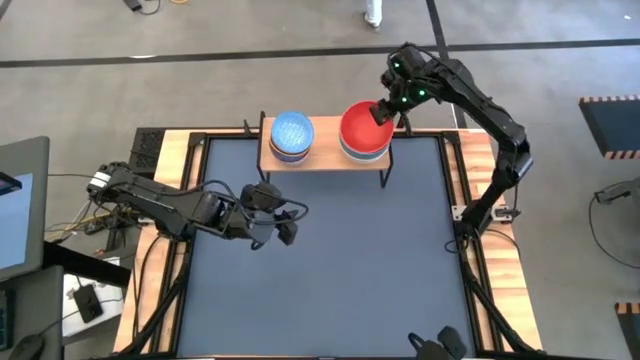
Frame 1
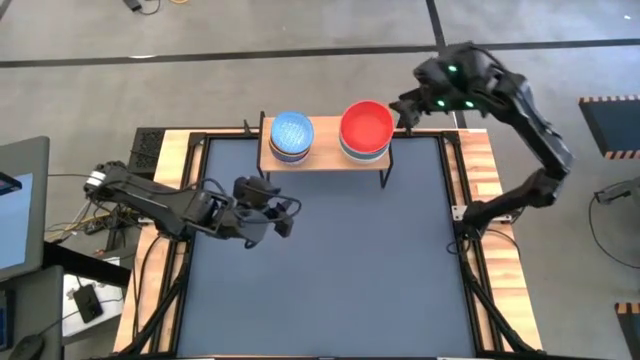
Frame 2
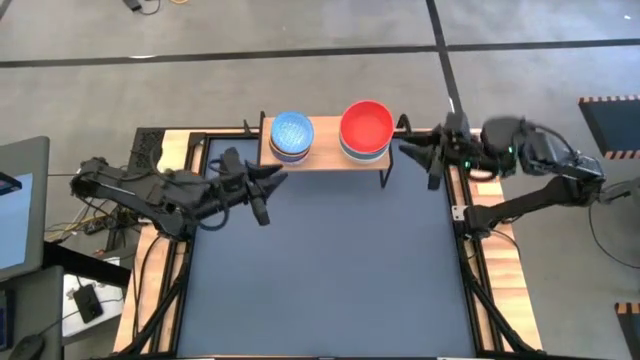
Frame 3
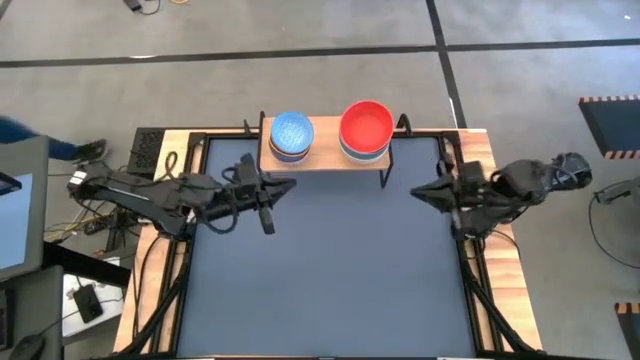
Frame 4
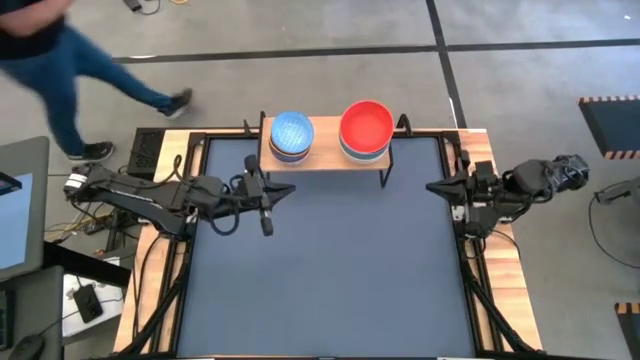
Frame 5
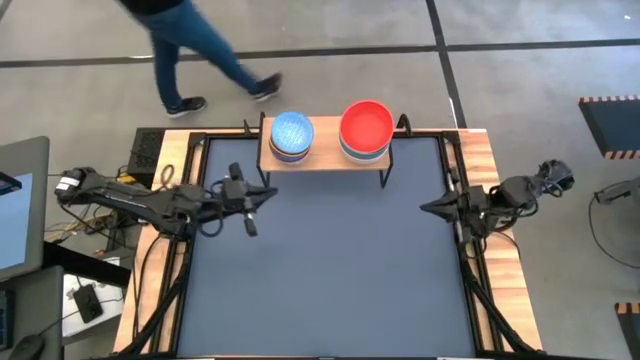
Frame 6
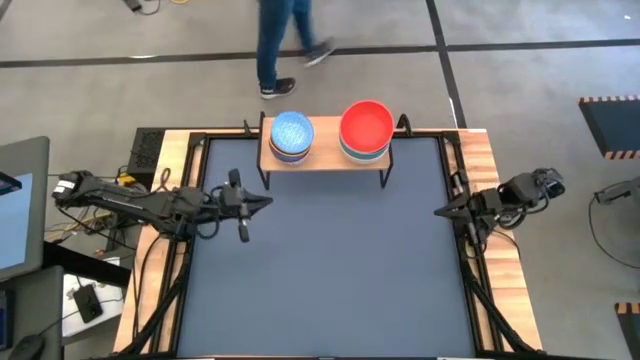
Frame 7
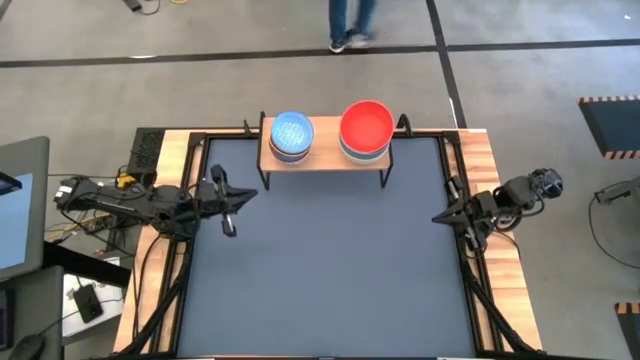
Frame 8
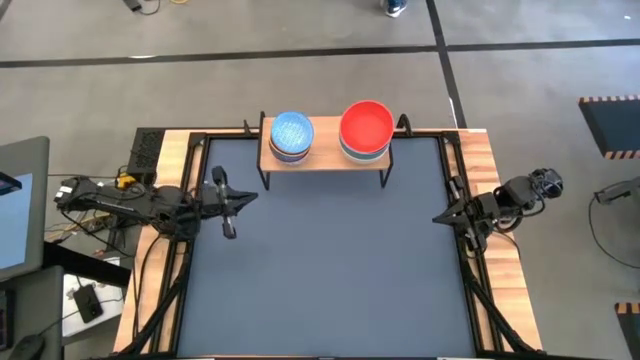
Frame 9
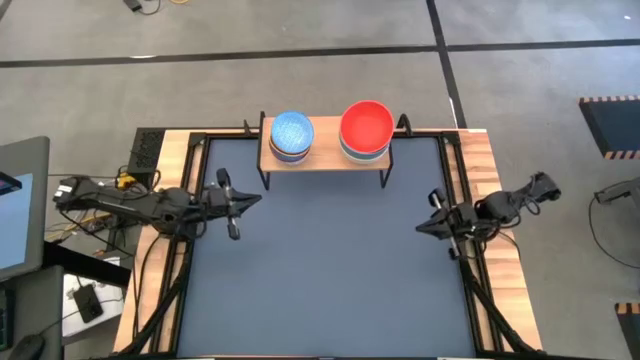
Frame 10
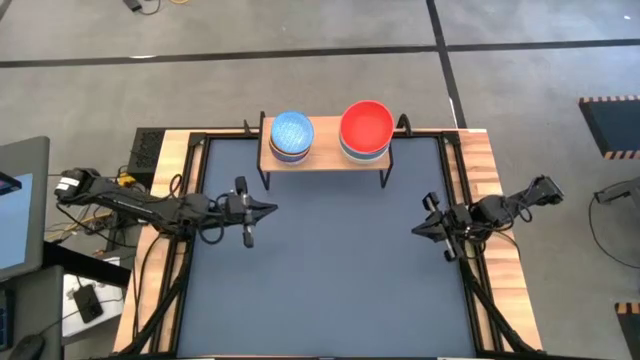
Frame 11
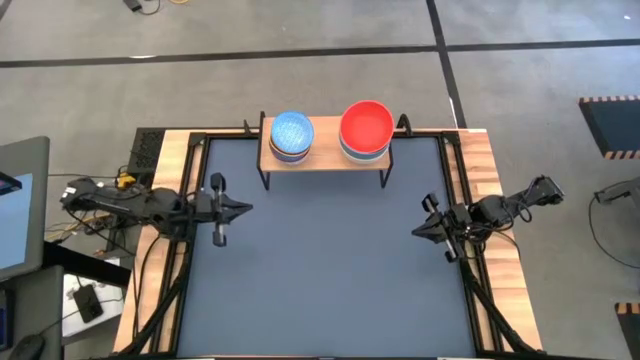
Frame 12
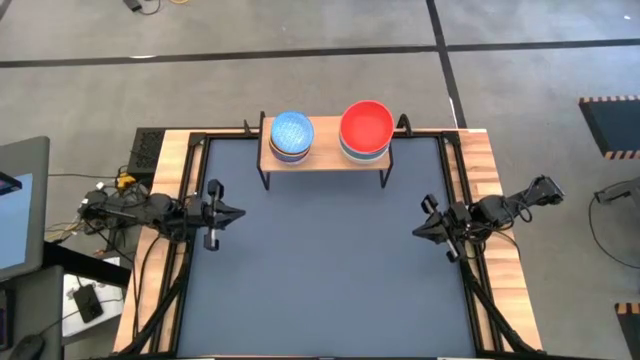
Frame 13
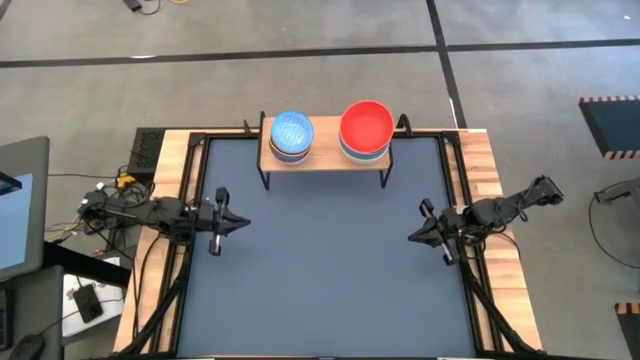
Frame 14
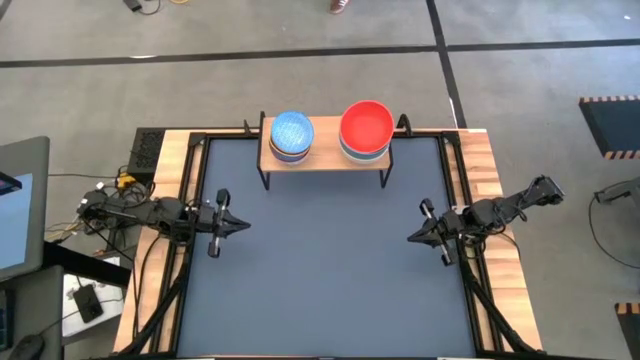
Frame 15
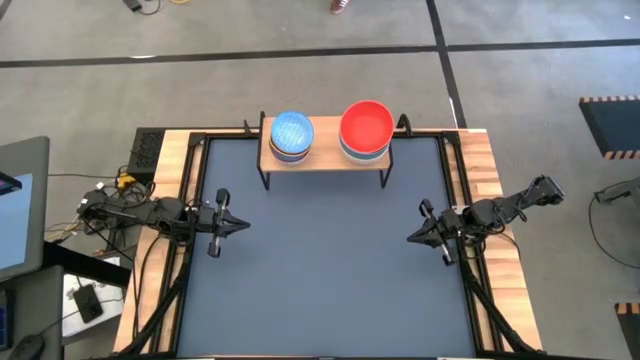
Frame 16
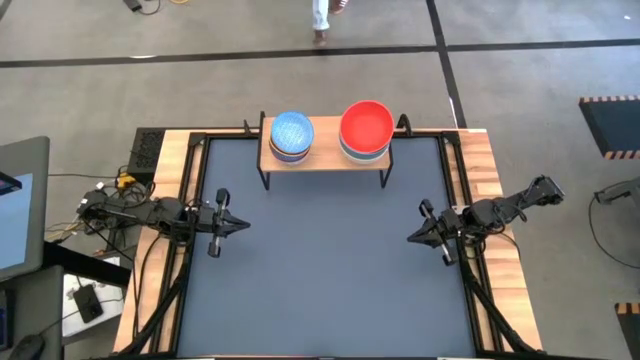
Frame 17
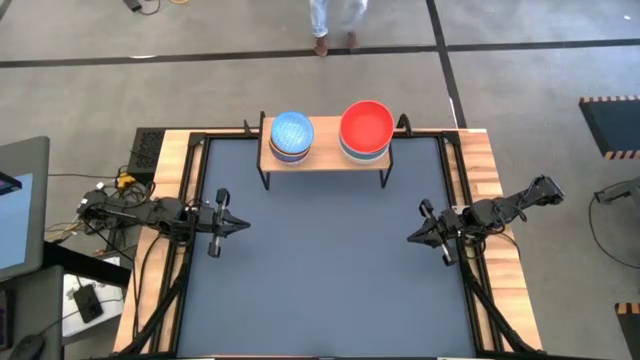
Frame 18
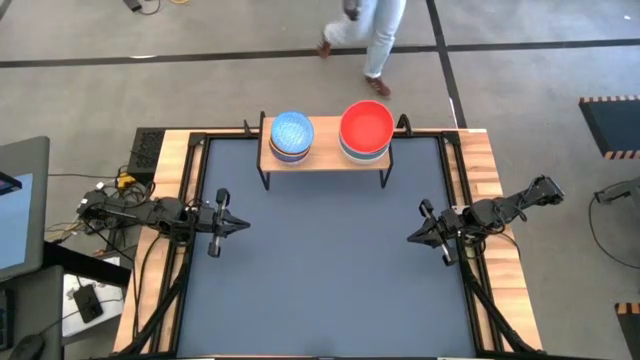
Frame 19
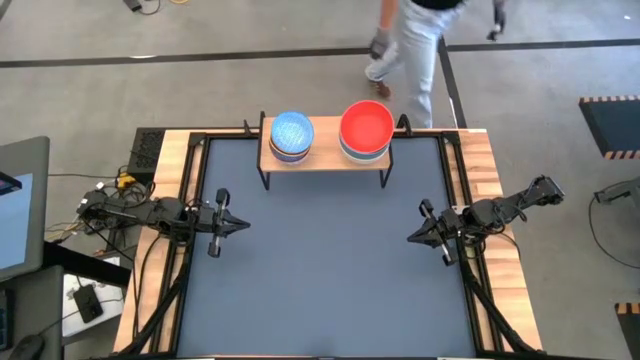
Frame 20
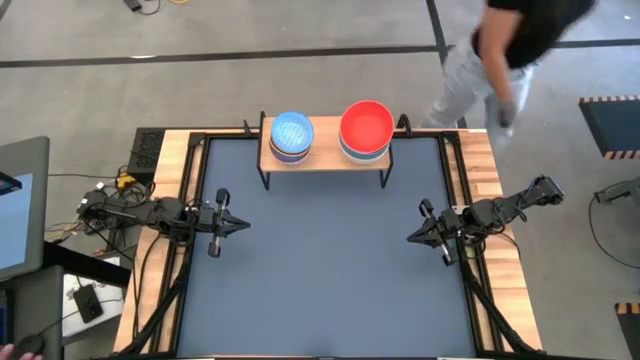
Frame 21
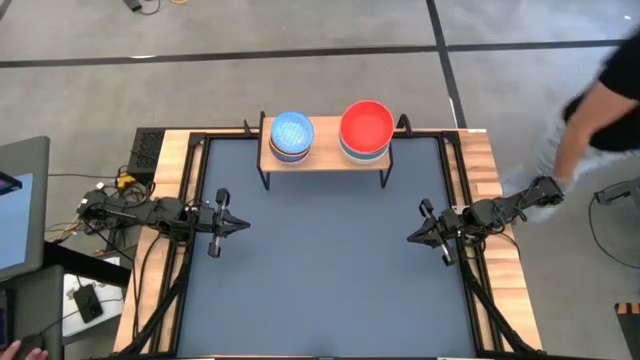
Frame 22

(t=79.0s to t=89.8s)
Task: Place and stack bowls onto a shelf
Return to Home Position

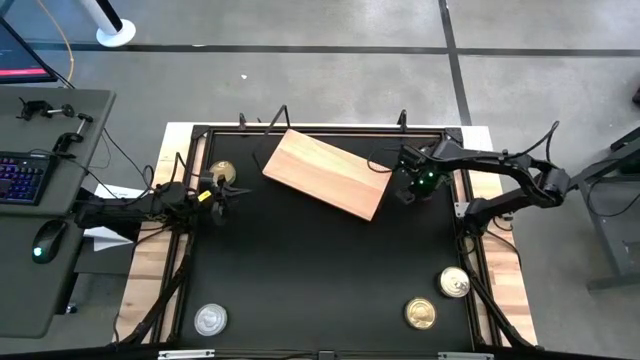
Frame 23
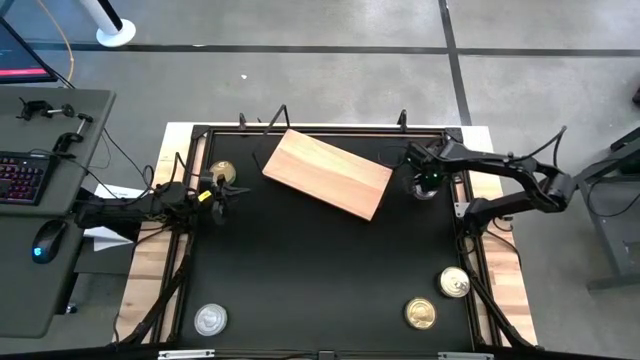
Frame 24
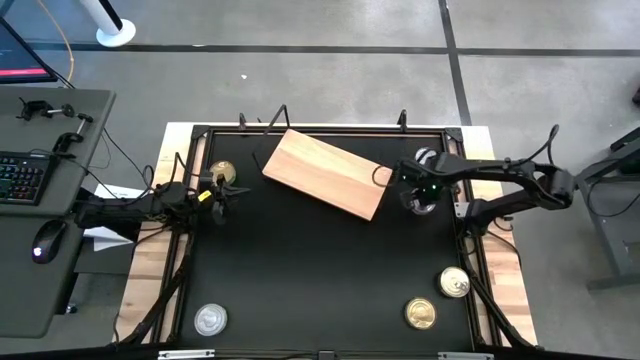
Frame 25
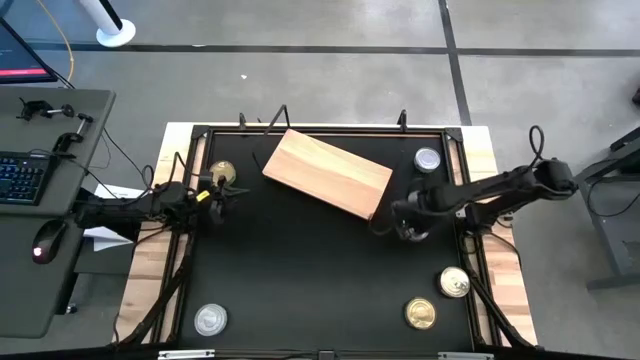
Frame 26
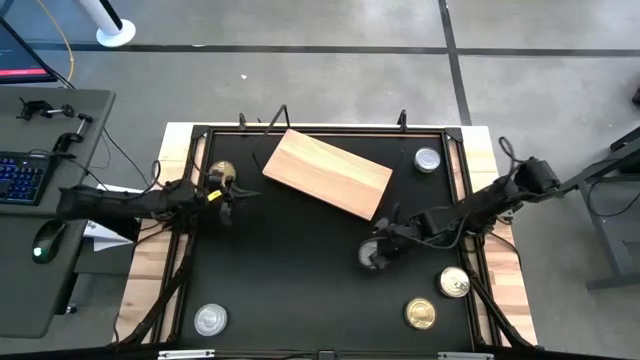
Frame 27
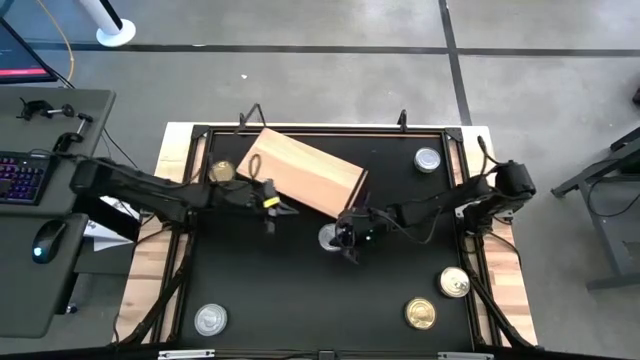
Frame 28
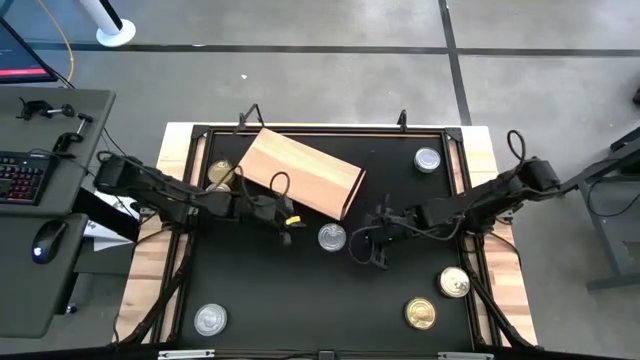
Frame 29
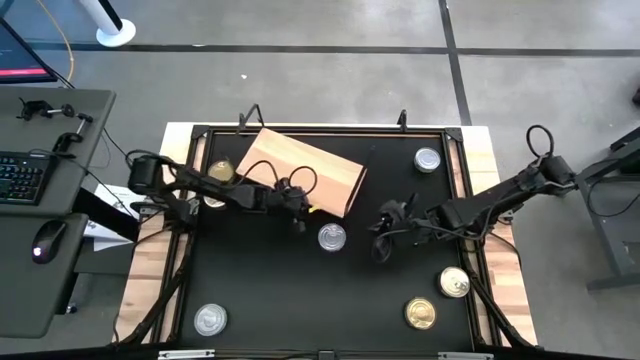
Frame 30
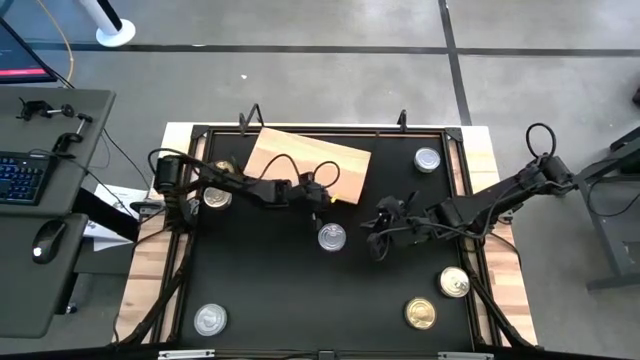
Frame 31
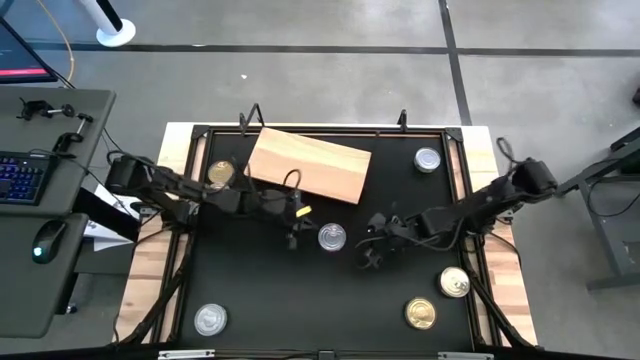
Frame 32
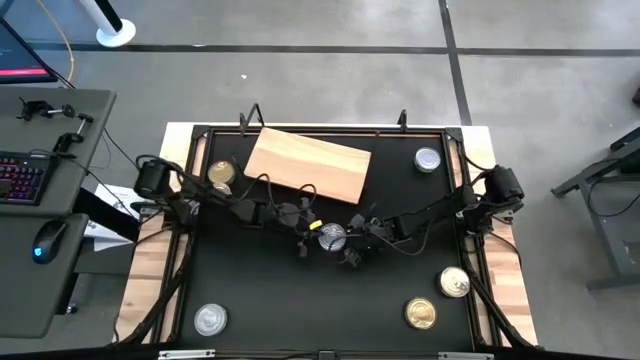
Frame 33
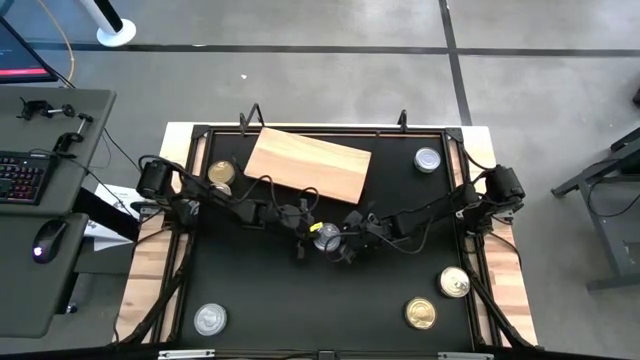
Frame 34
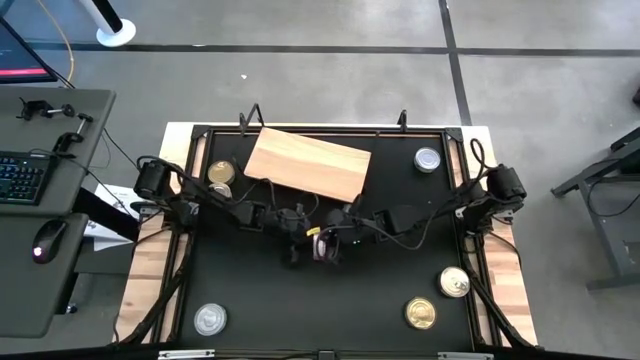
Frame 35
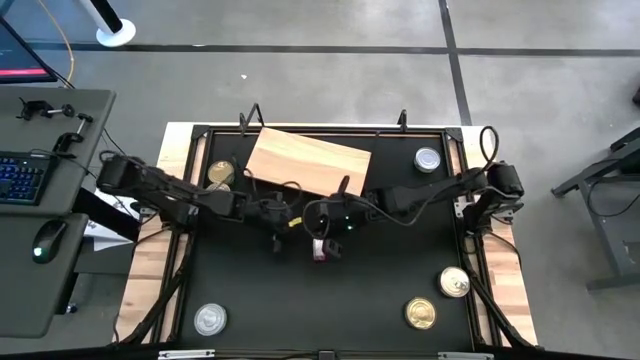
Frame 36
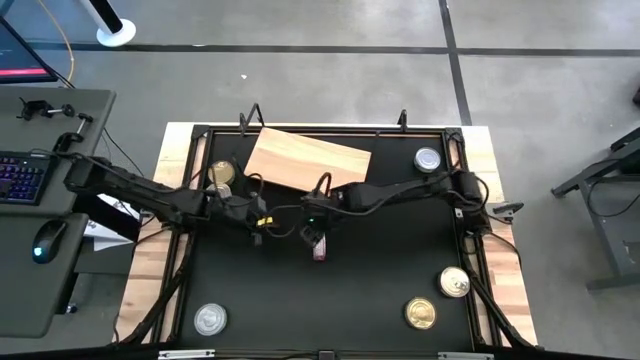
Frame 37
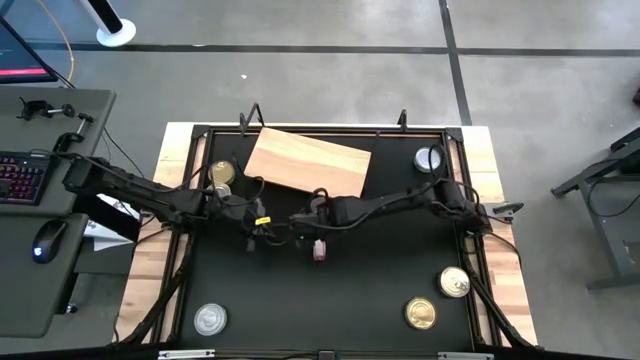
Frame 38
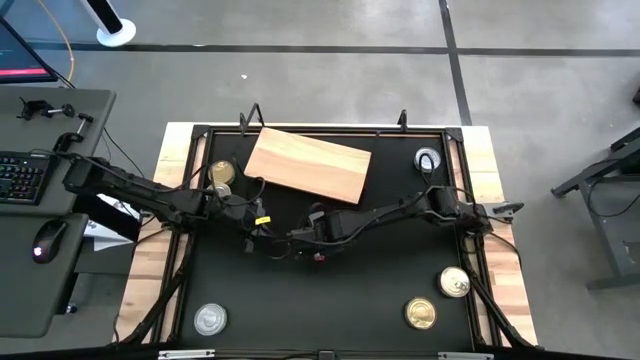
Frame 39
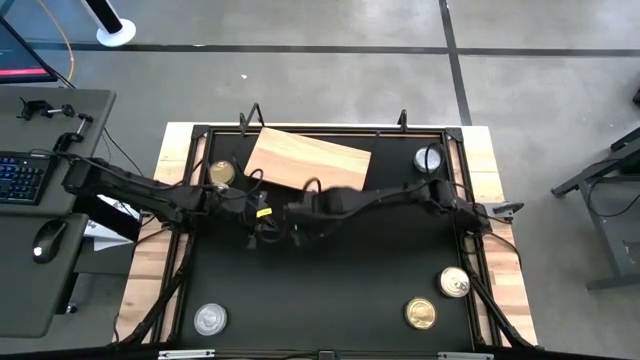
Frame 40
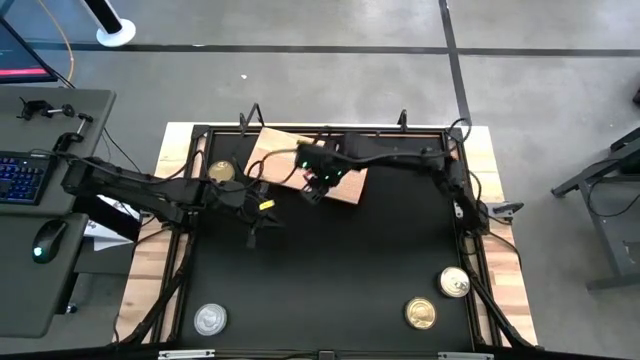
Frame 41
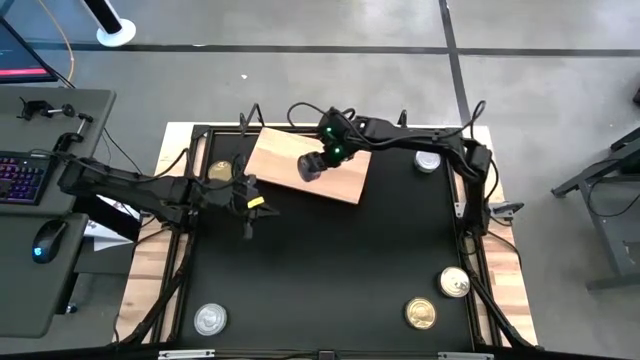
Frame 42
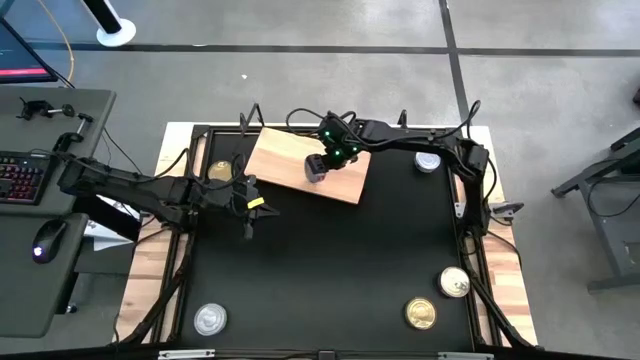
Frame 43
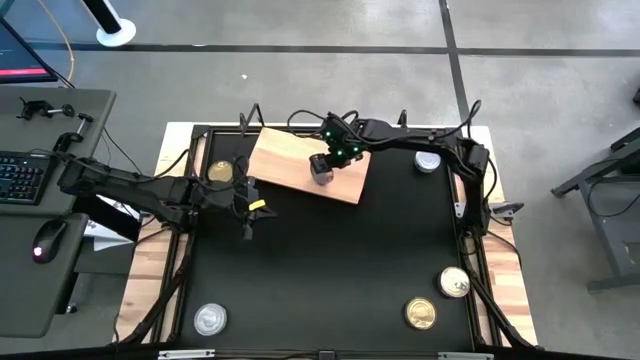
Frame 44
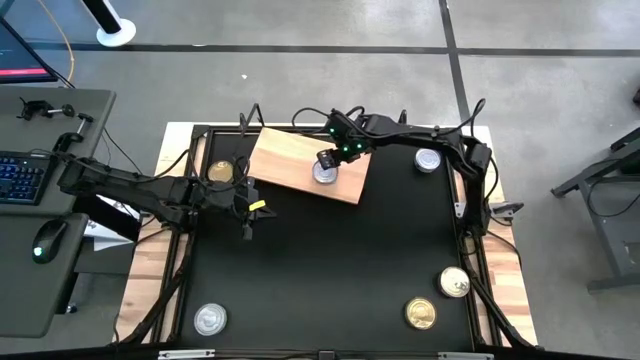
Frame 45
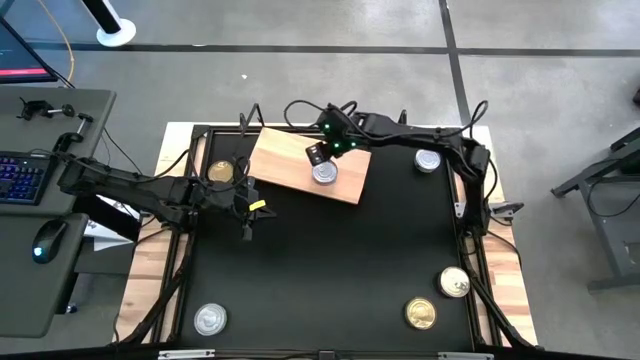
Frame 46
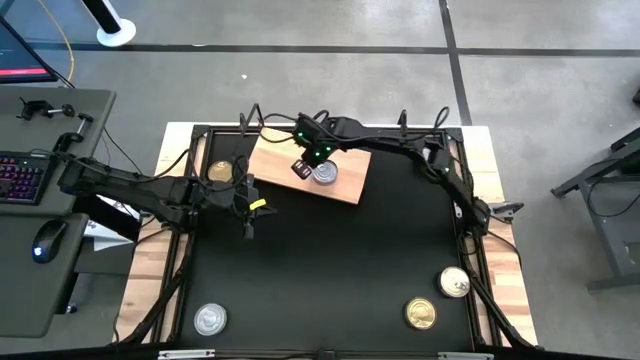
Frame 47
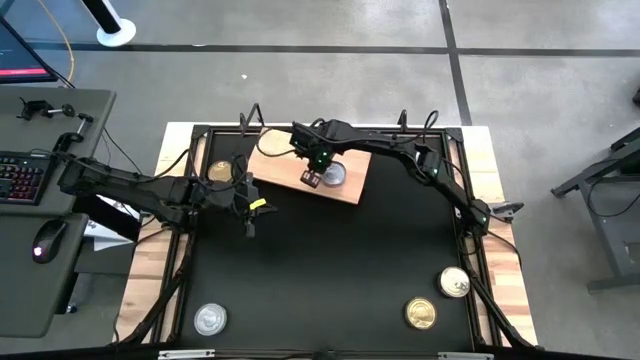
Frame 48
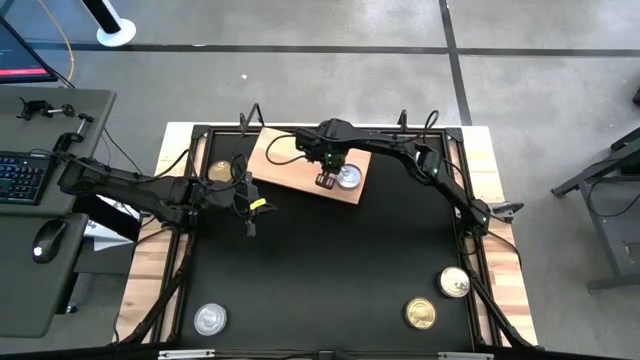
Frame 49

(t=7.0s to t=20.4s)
Task: Stack canned seafood by type on shelf
Put the red tuna can on the shelf
